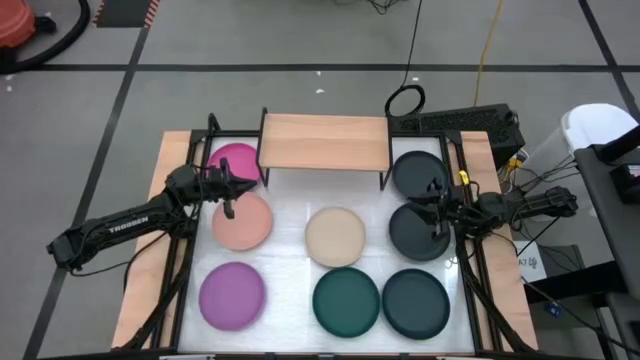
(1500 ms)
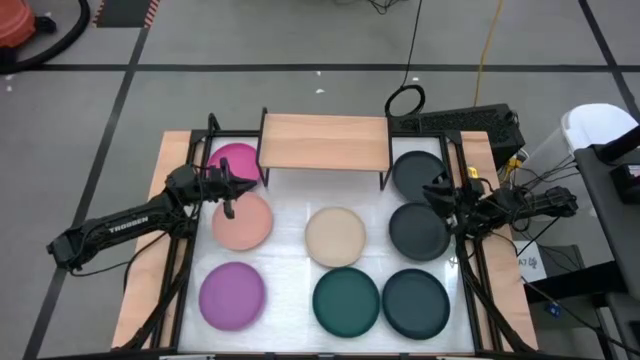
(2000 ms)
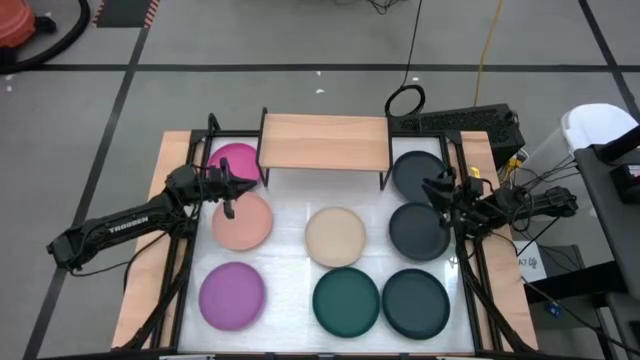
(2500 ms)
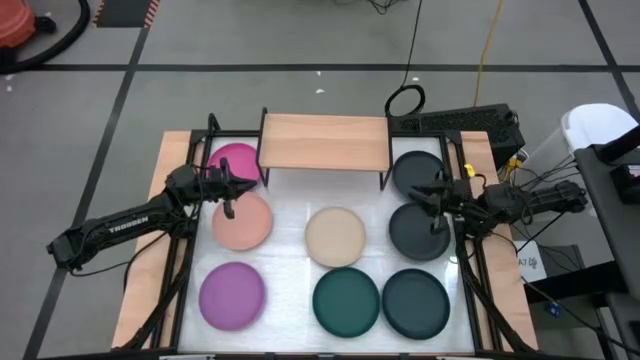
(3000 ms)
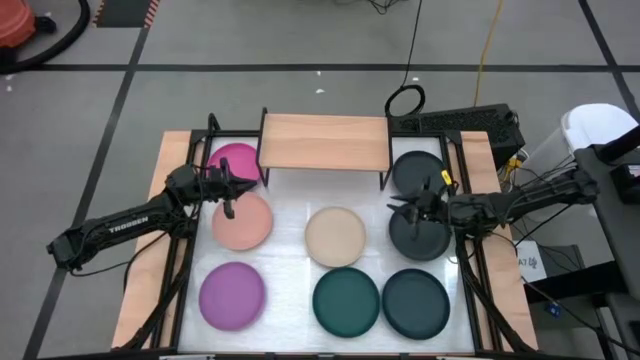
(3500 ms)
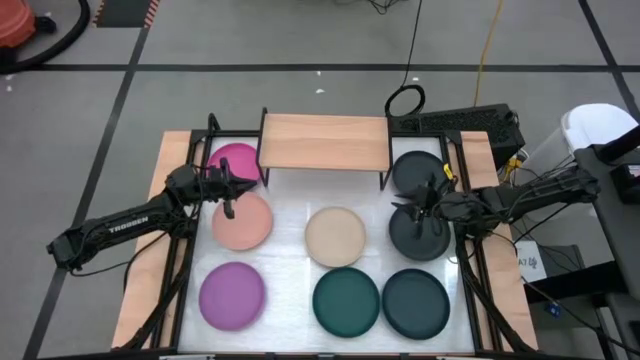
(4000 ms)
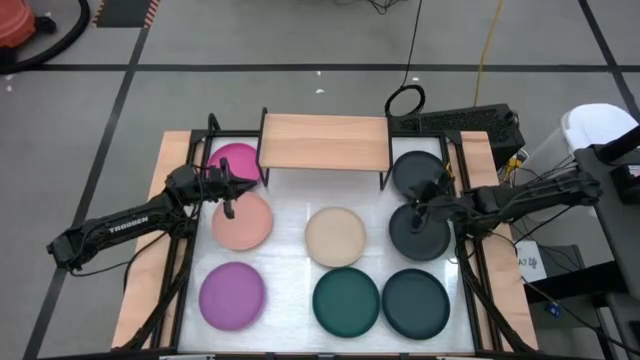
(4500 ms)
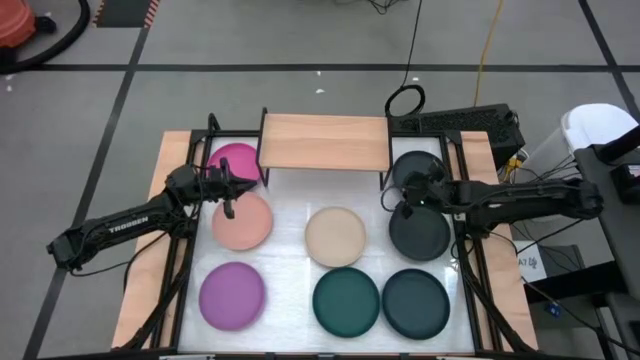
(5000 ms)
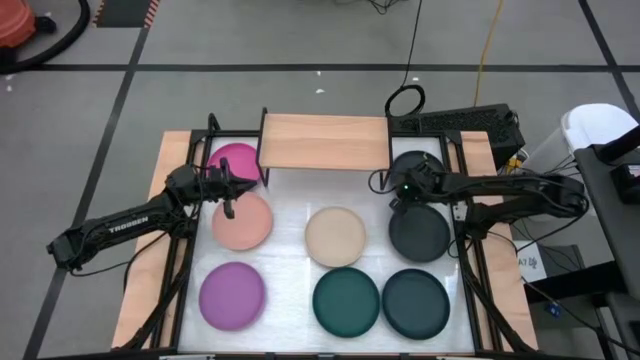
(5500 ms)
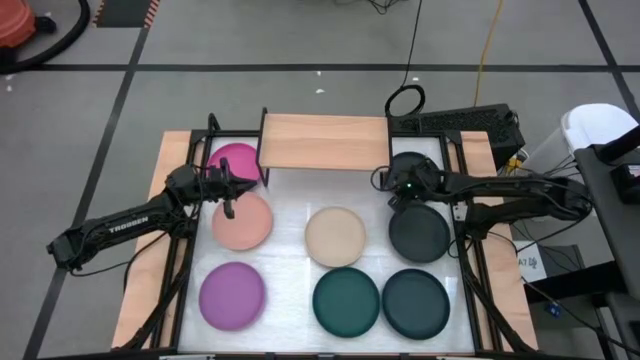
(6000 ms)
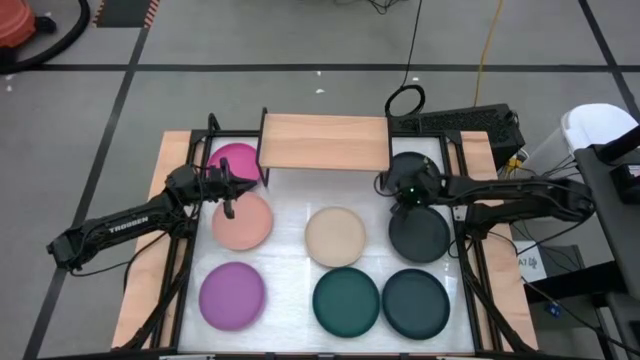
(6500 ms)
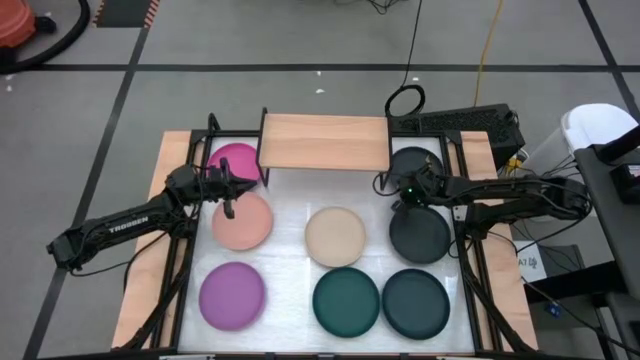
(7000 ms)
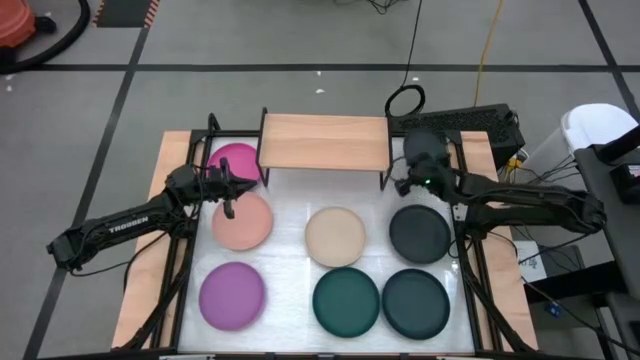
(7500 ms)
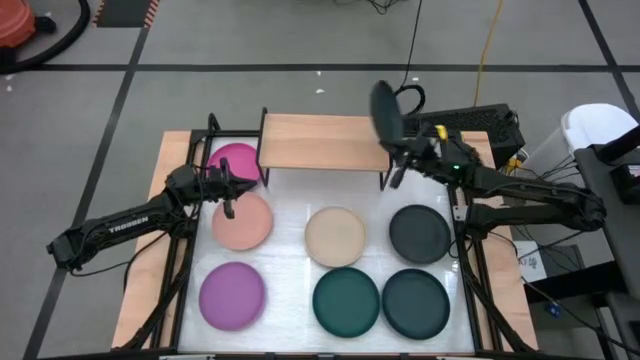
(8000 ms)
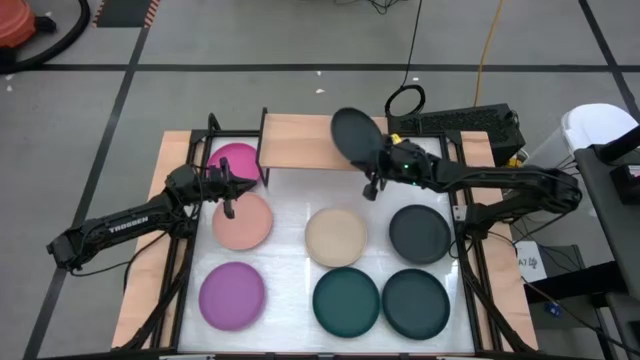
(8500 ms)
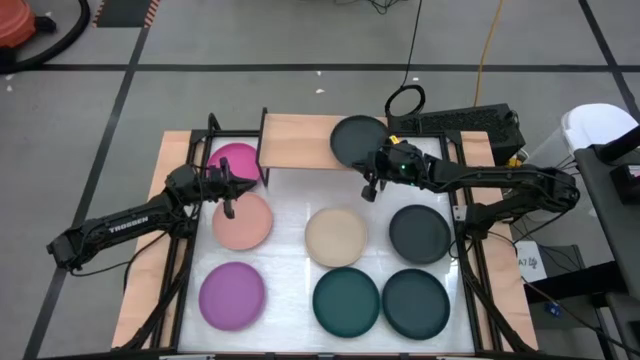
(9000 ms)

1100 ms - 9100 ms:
Task: Place and stack plates onto a shelf
Put the top black plate on the shelf

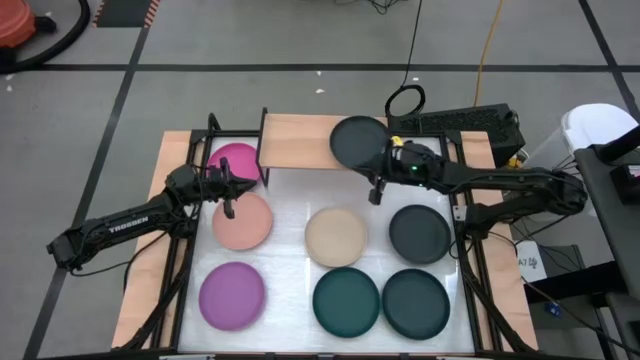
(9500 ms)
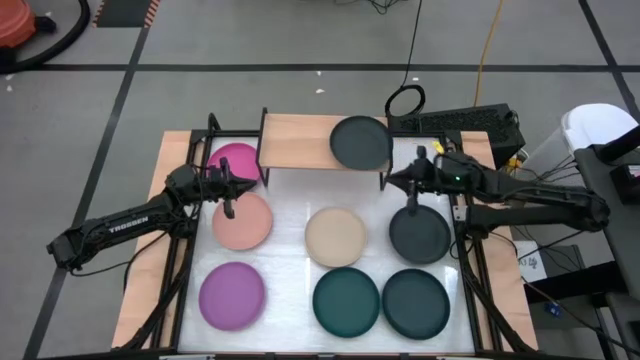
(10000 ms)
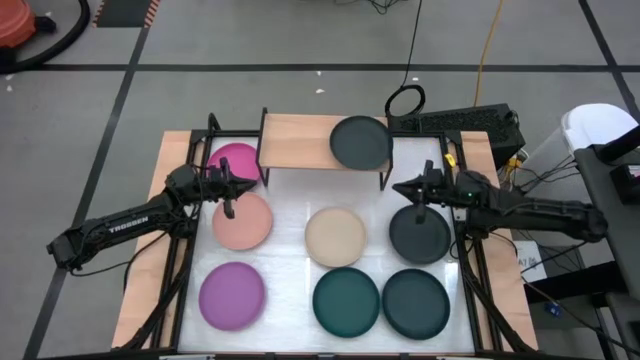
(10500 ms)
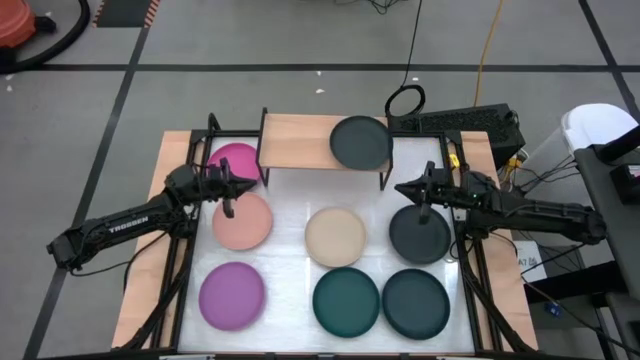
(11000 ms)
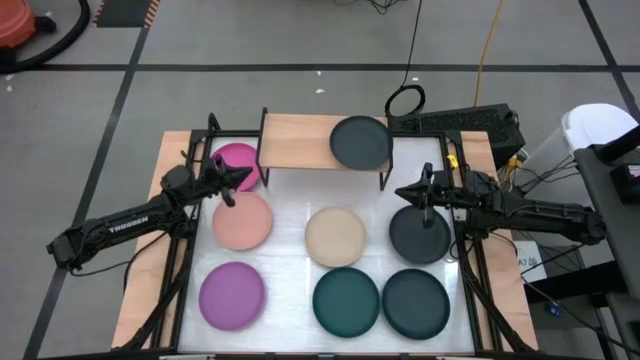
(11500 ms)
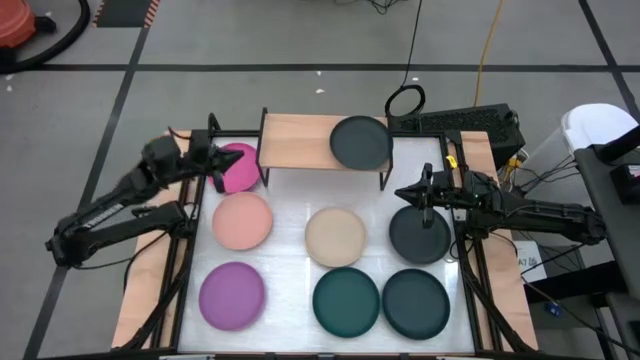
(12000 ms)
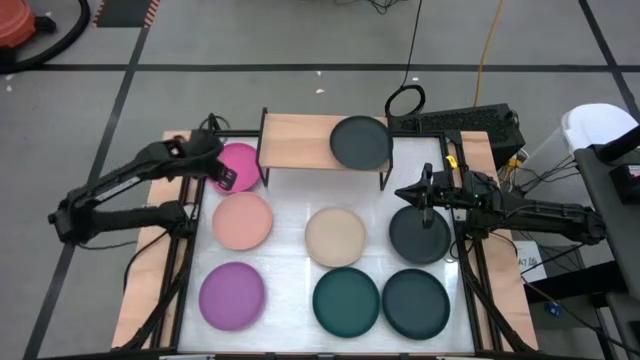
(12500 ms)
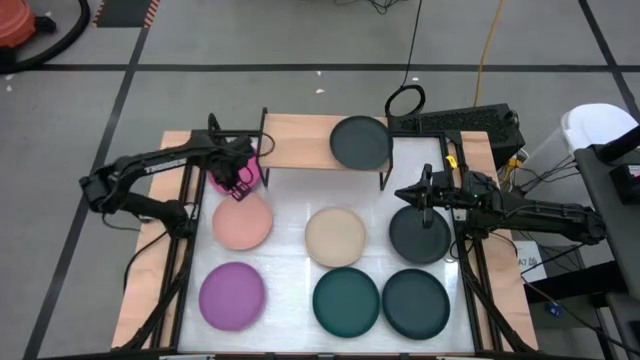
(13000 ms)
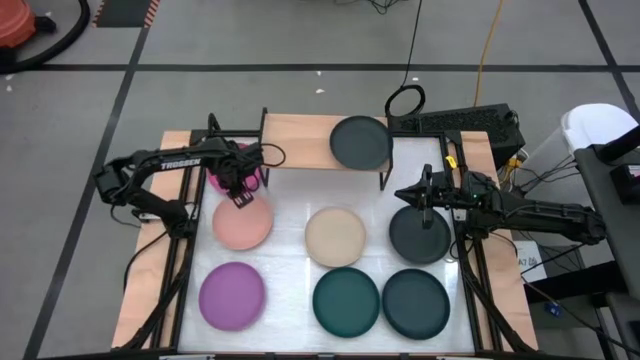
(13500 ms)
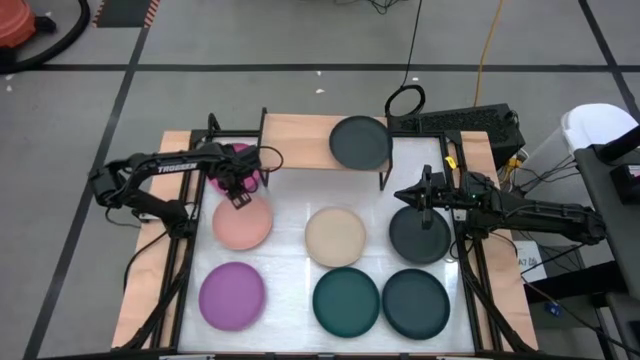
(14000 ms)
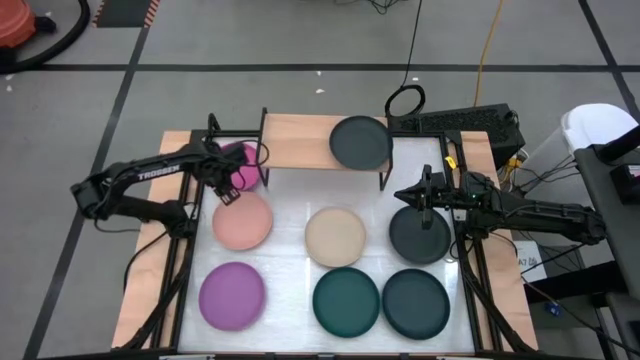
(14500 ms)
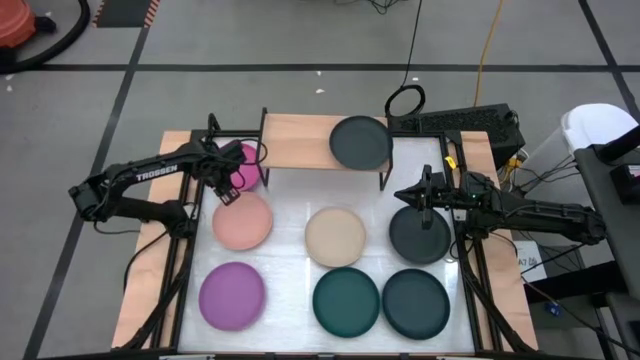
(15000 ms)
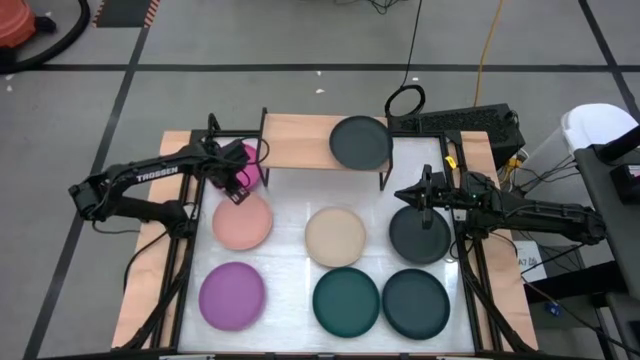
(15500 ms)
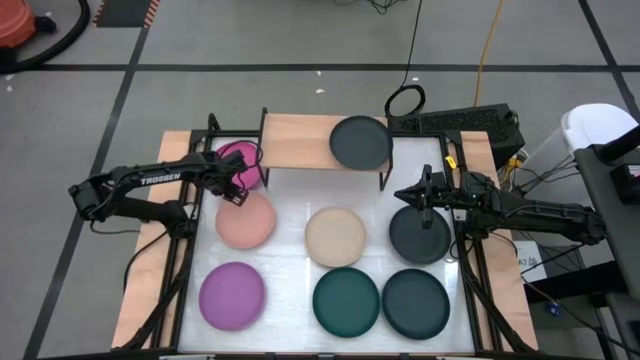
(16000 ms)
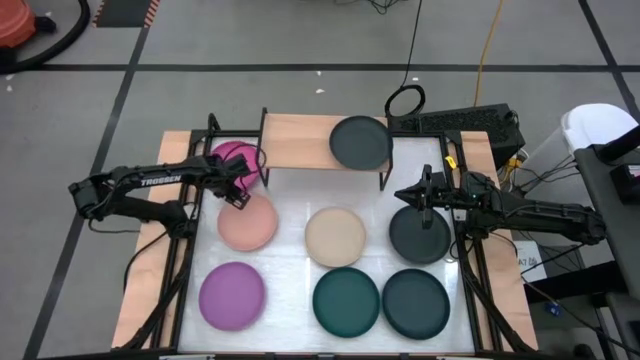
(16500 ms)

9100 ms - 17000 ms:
Stack the pink plate on top of the black plate on the shelf

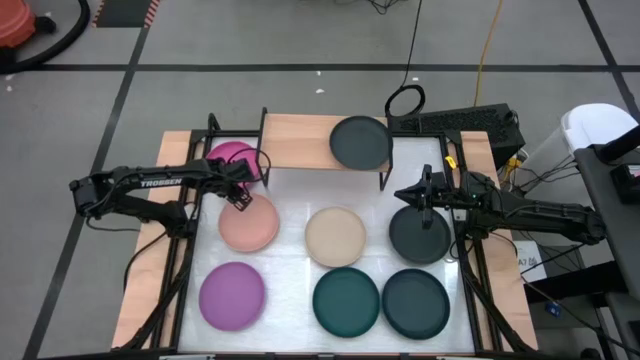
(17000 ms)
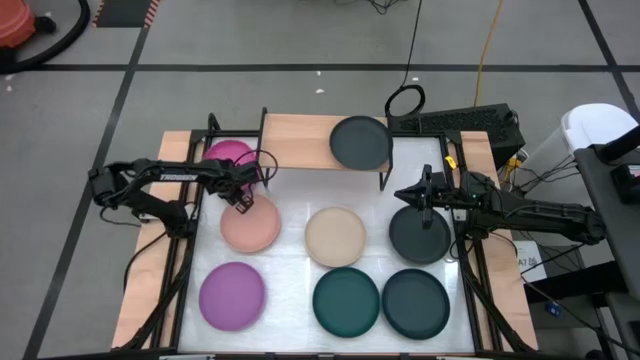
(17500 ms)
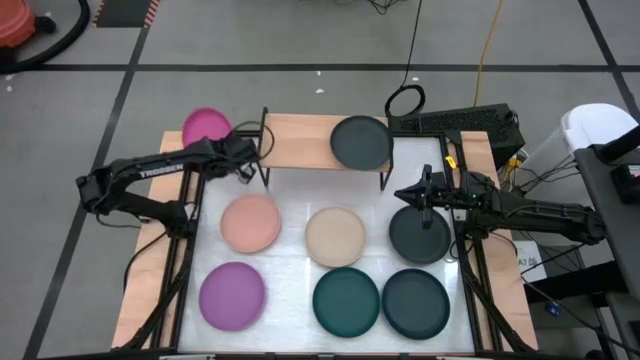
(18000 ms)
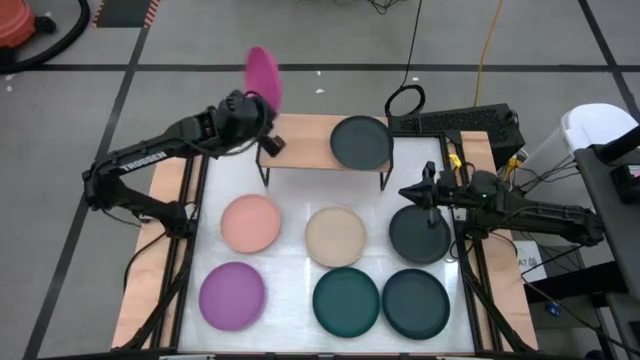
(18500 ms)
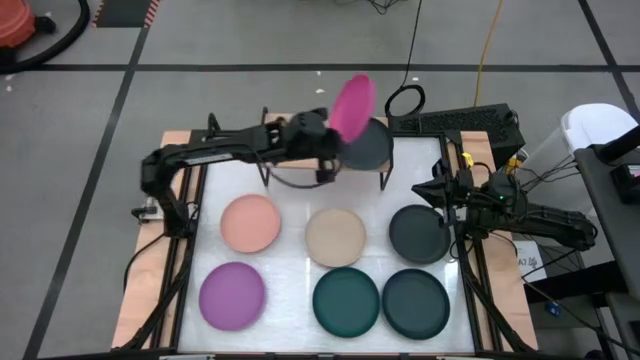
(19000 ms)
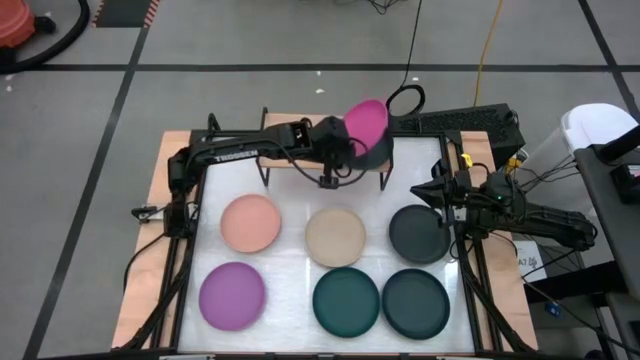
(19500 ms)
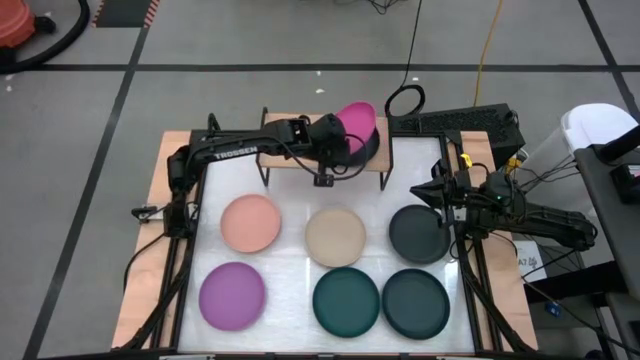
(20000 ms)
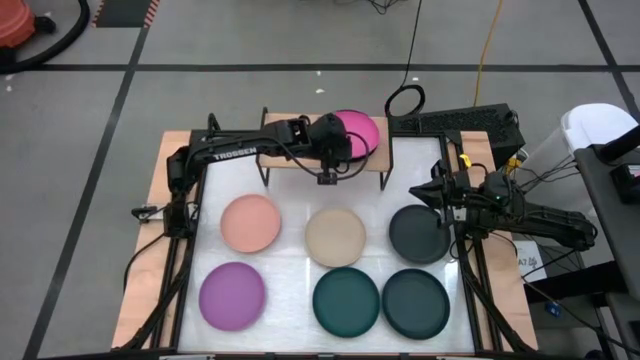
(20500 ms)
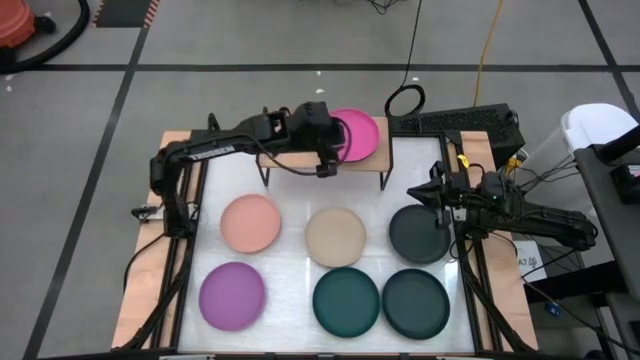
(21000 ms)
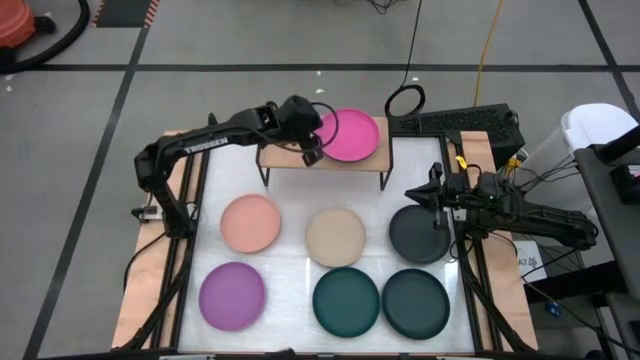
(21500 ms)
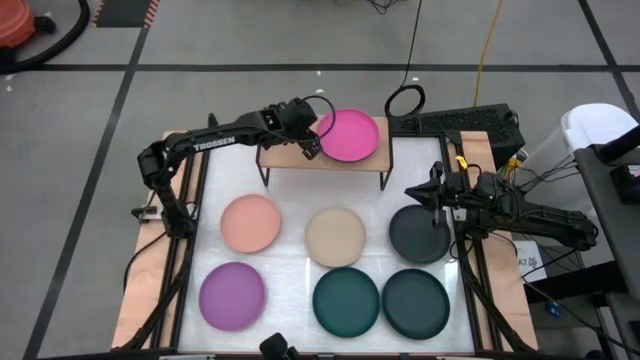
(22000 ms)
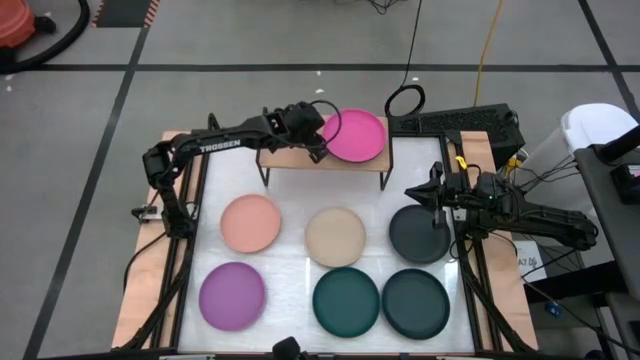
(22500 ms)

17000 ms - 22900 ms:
Stack the pink plate on top of the black plate on the shelf
